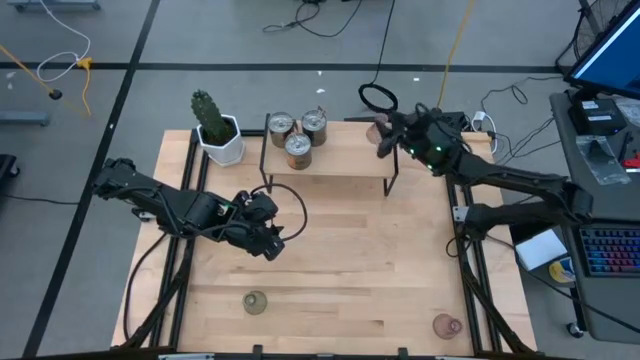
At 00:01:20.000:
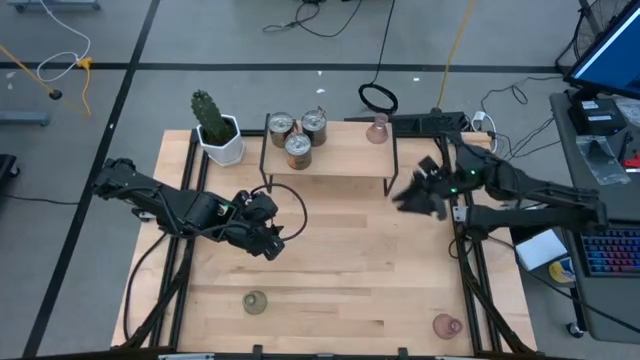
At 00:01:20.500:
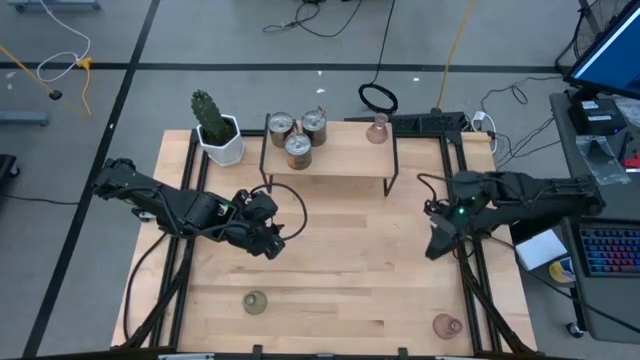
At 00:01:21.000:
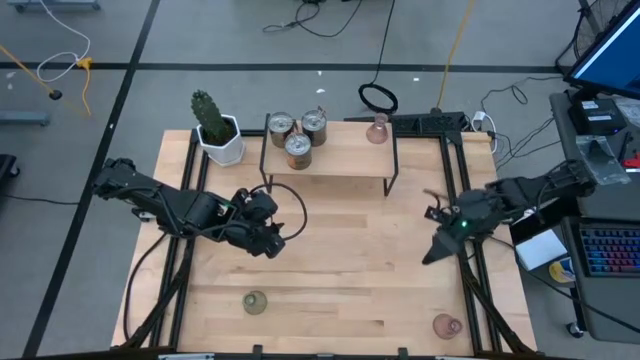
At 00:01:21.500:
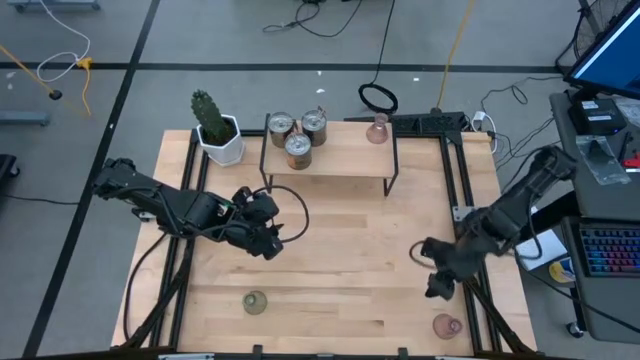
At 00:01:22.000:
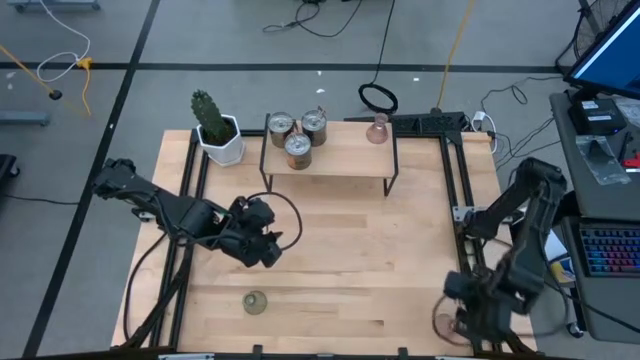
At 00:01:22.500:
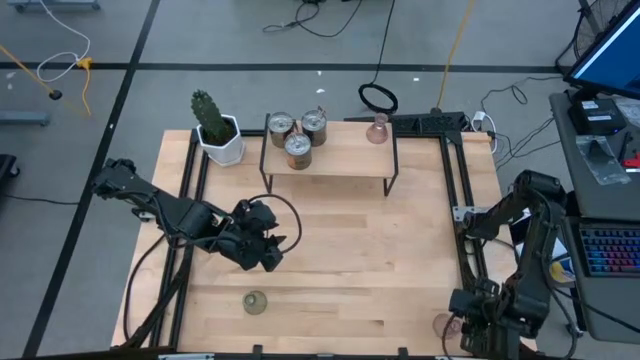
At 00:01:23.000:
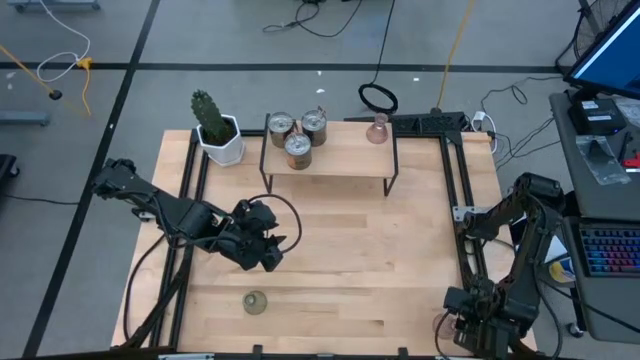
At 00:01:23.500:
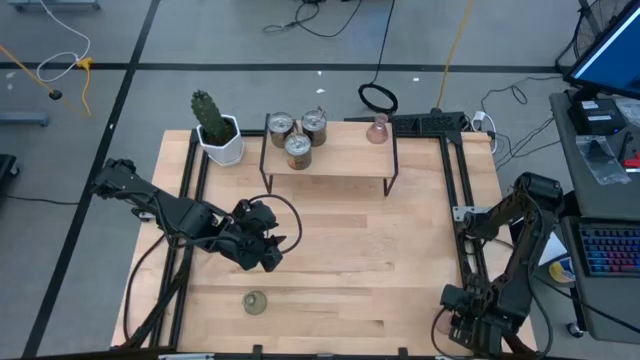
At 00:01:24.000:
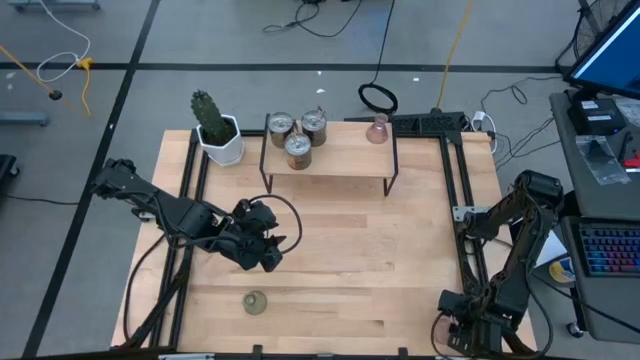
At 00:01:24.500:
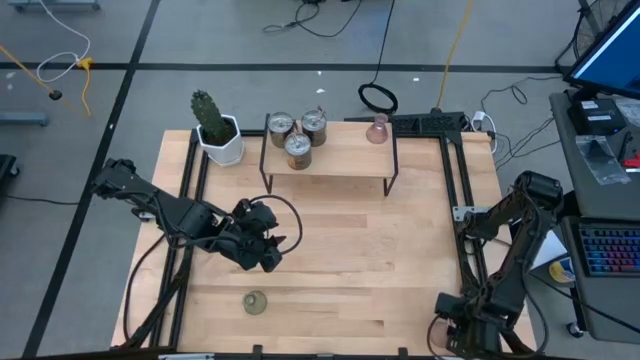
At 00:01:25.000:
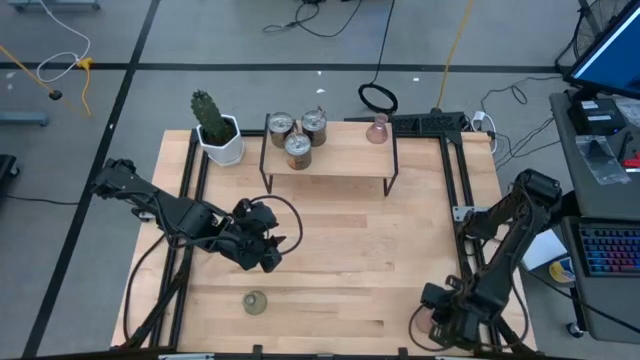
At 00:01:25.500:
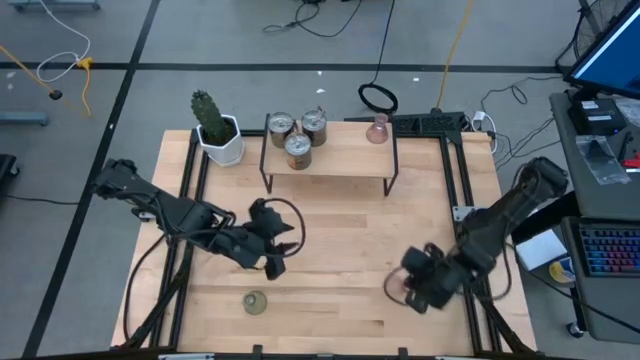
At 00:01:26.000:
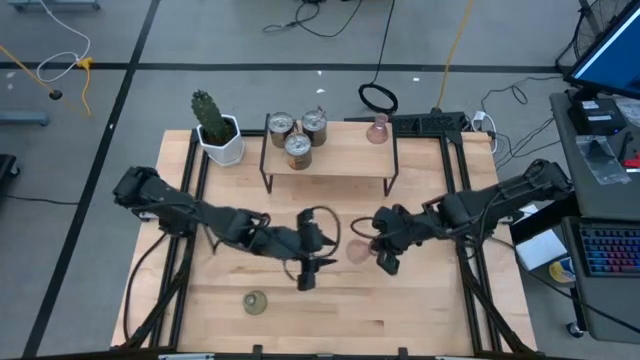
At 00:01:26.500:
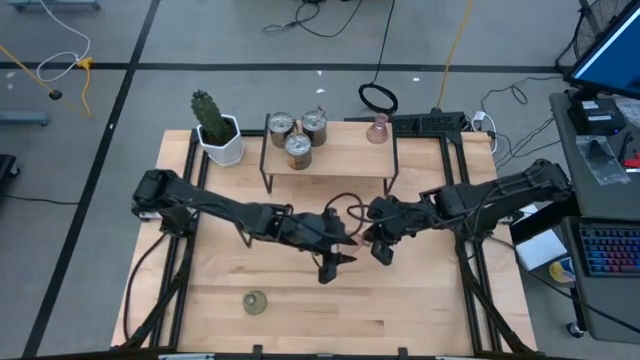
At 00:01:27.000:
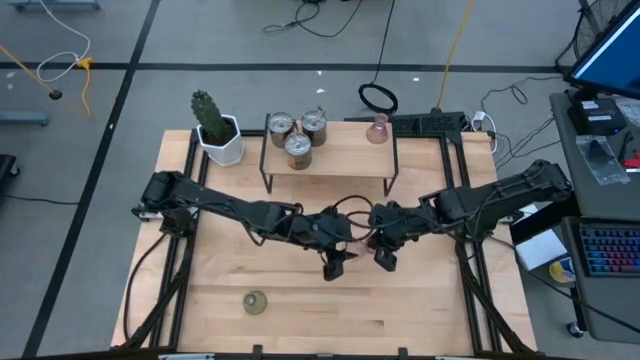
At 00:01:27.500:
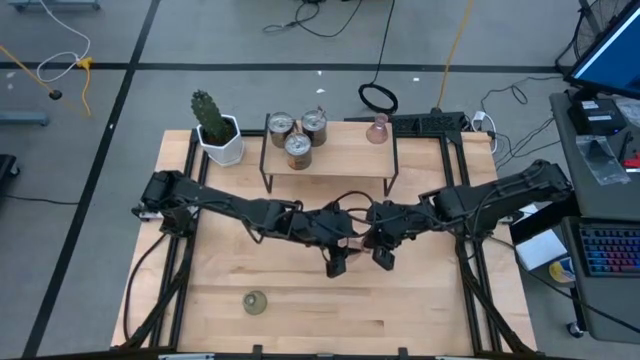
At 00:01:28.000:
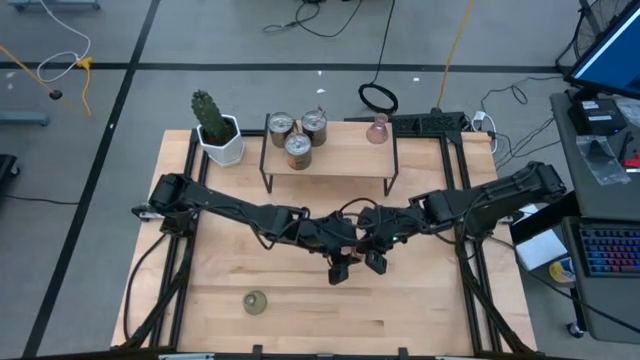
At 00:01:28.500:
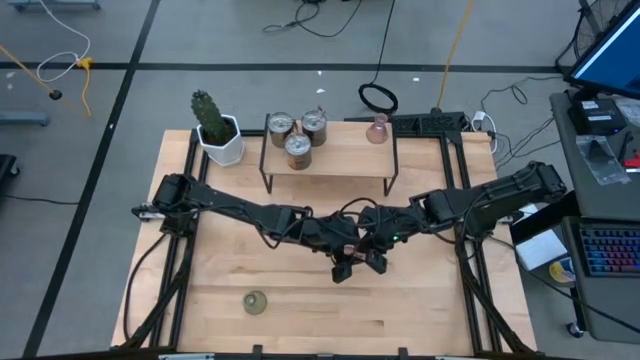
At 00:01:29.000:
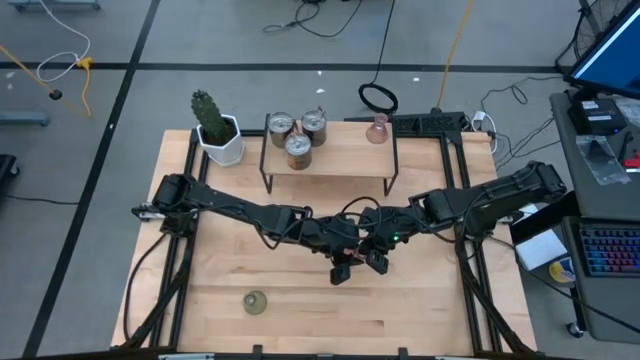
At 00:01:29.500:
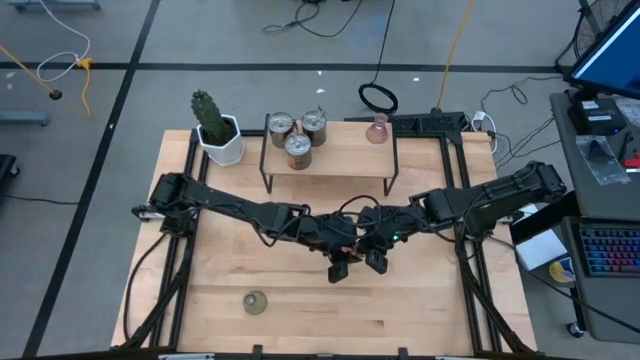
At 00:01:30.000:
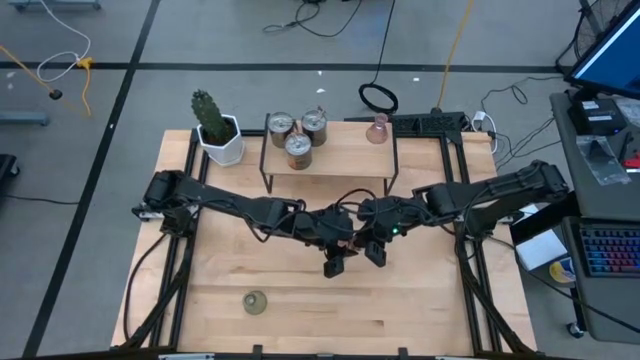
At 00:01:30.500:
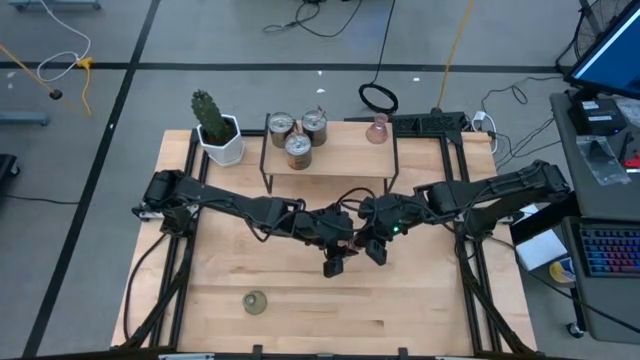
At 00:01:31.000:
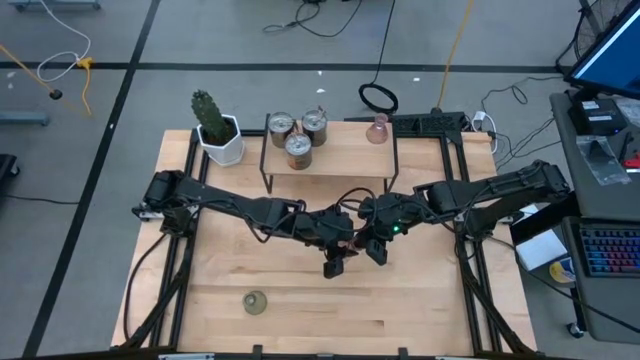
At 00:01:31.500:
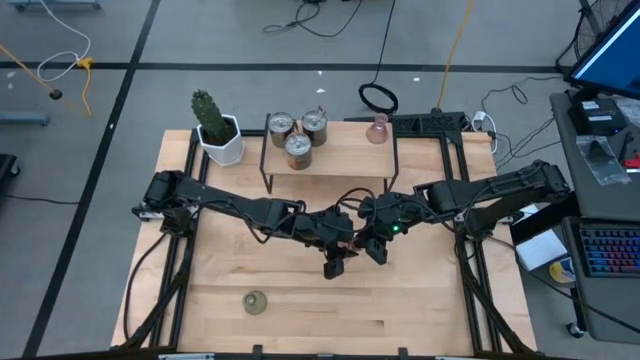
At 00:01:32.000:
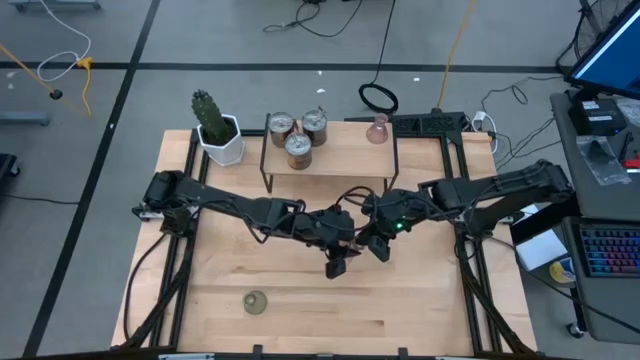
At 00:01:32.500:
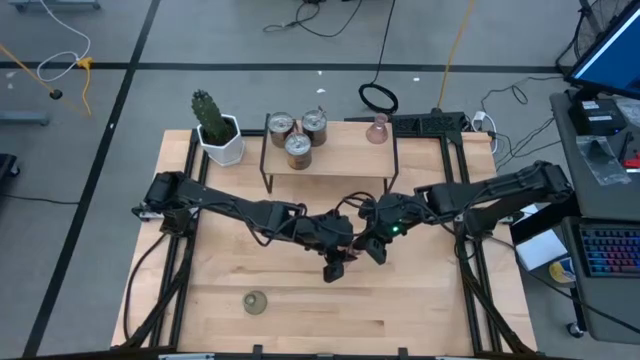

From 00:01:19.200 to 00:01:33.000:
Task: Pick & Place candle stick holders
Put the pink glass candle holder on the shelf

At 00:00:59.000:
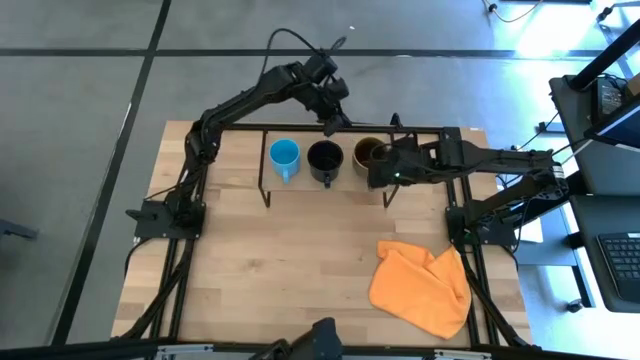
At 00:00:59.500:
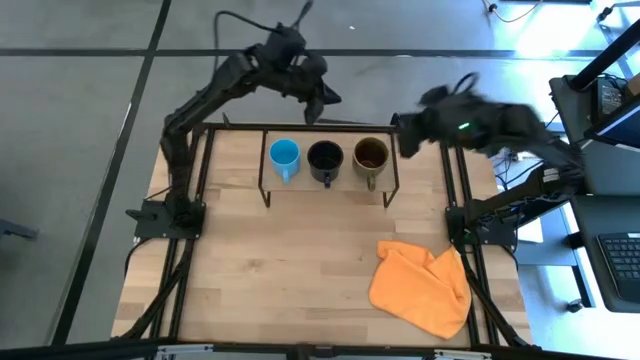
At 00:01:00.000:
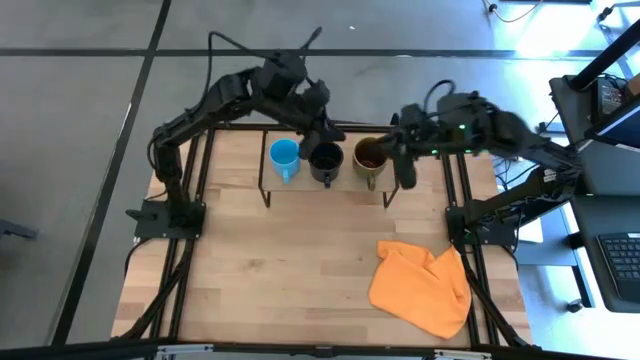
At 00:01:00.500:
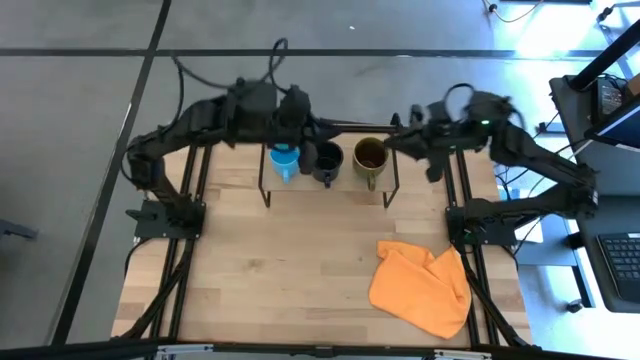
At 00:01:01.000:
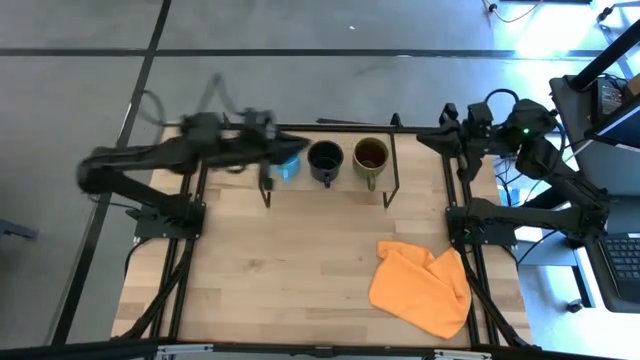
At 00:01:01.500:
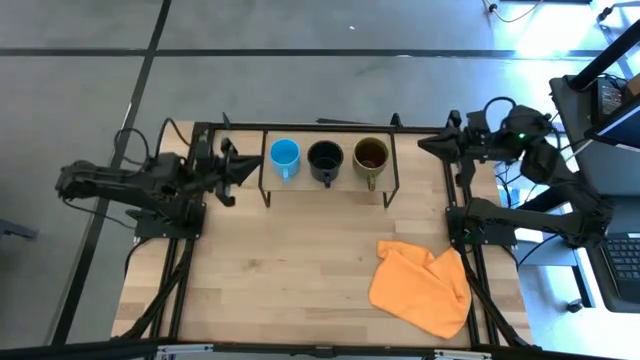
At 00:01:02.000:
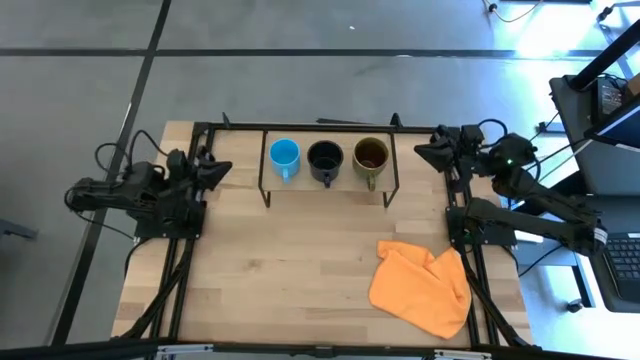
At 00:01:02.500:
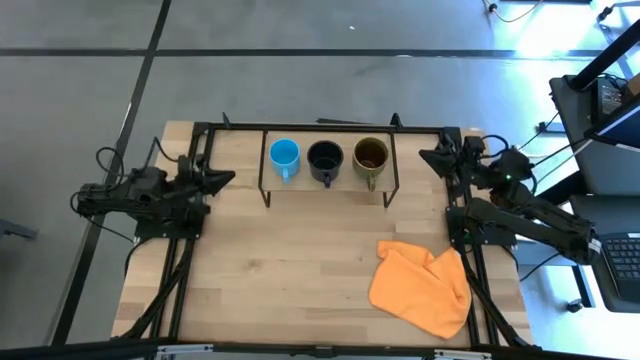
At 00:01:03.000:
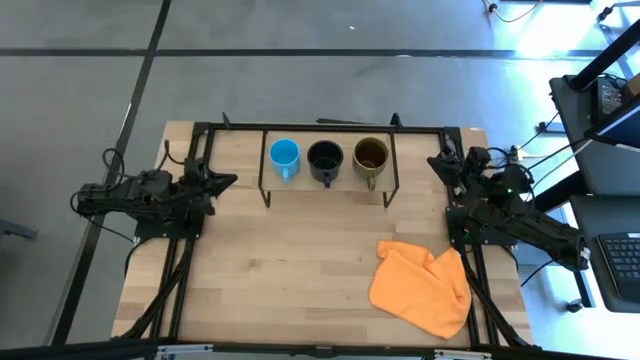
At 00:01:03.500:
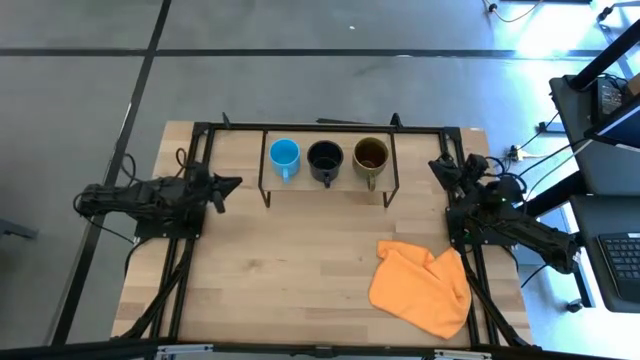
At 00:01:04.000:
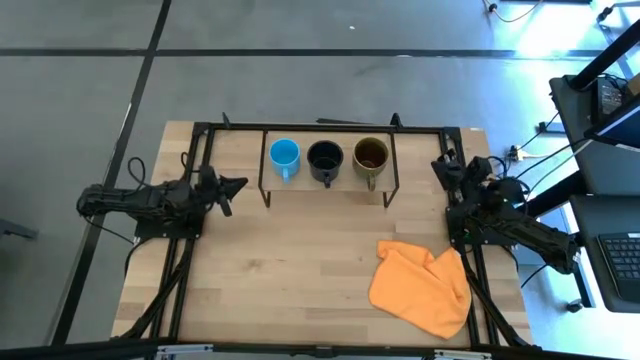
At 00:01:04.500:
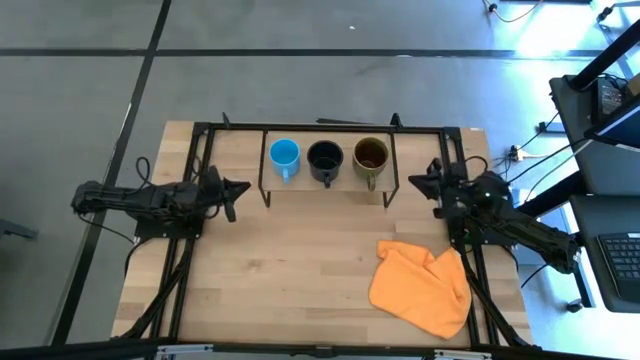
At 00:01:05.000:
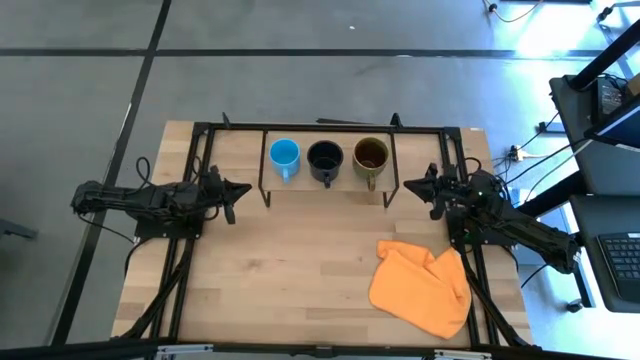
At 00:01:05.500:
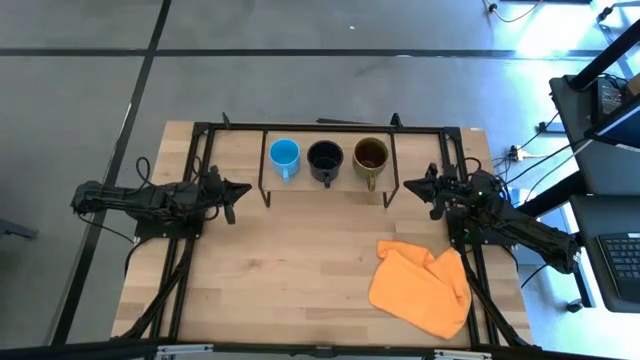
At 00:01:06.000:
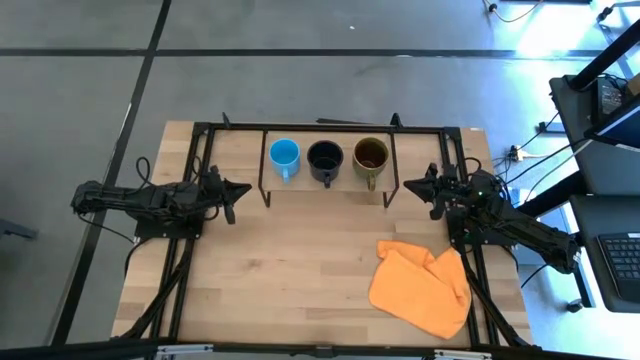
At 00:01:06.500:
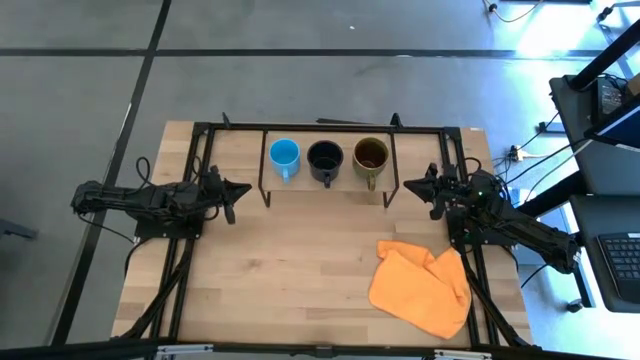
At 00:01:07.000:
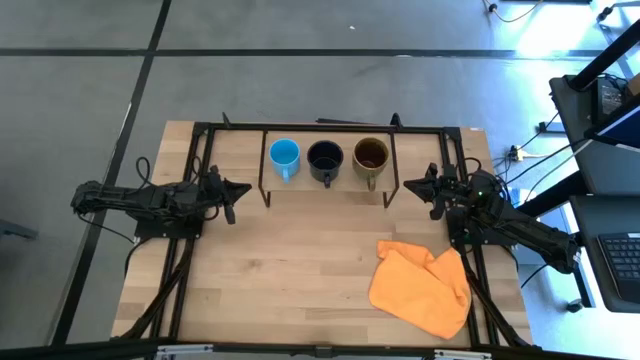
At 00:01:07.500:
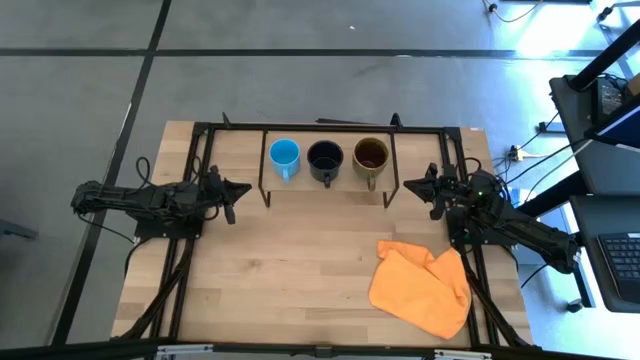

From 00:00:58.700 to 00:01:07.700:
Task: Stack small to large cups/mugs on shelf
Return to Home Position
